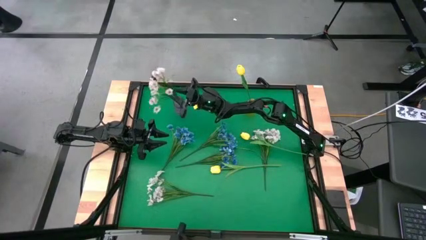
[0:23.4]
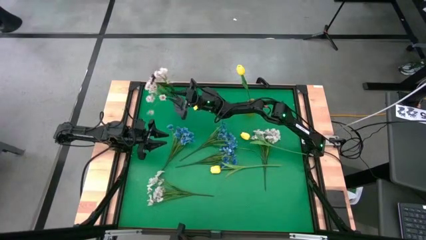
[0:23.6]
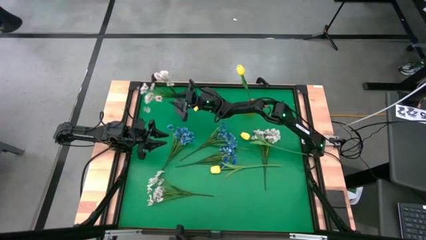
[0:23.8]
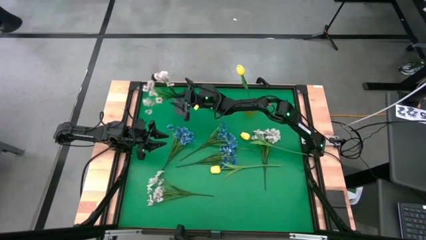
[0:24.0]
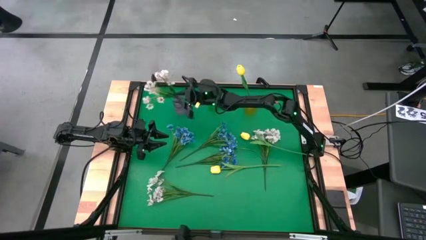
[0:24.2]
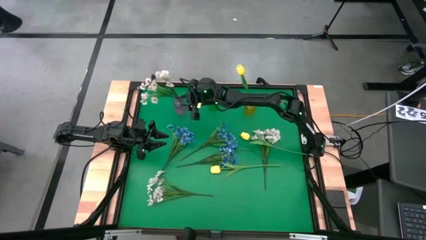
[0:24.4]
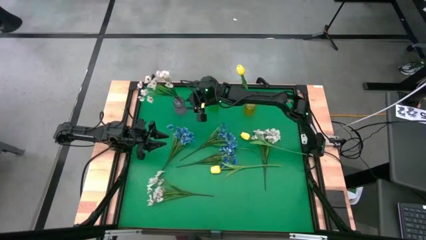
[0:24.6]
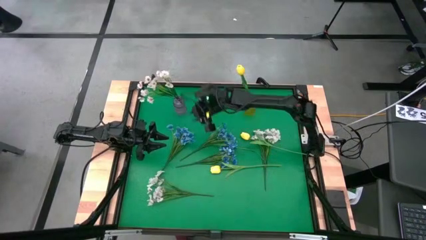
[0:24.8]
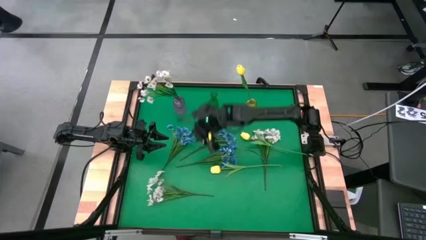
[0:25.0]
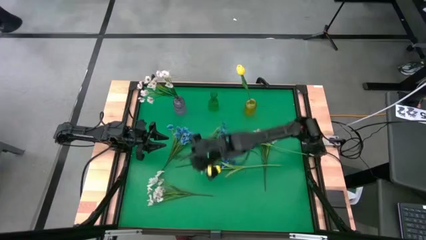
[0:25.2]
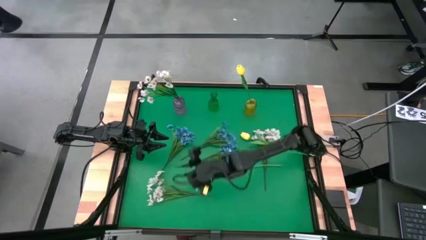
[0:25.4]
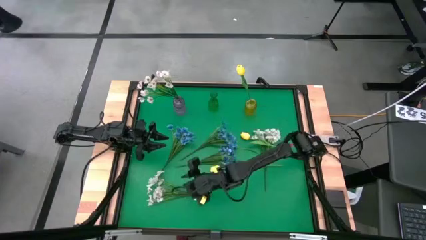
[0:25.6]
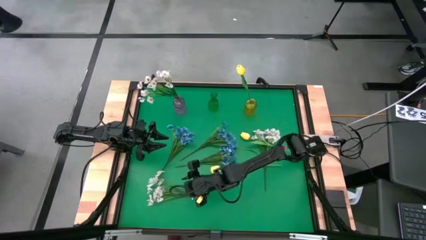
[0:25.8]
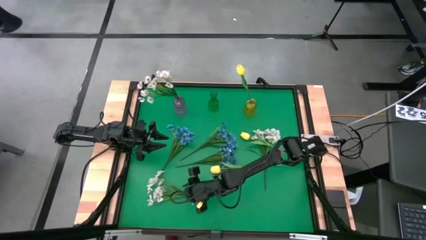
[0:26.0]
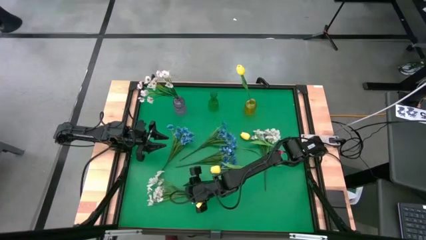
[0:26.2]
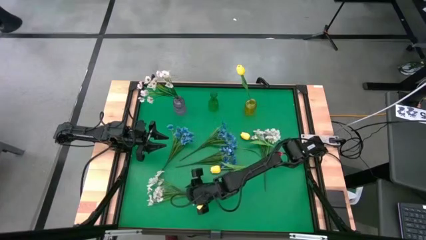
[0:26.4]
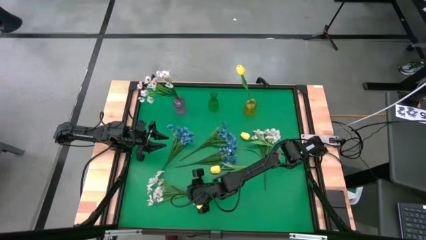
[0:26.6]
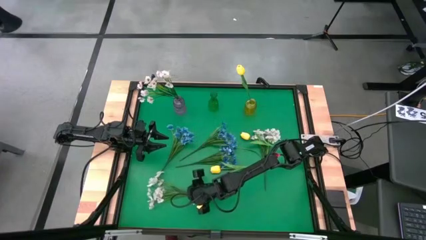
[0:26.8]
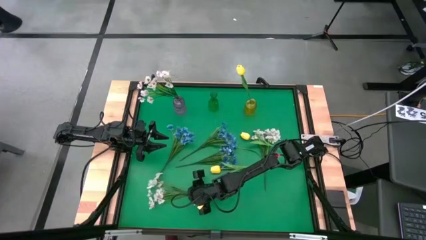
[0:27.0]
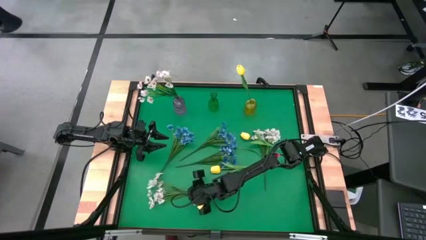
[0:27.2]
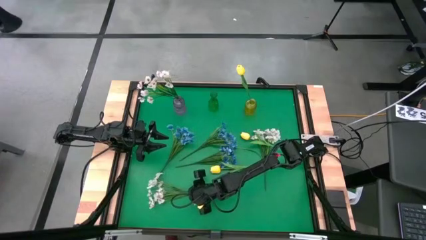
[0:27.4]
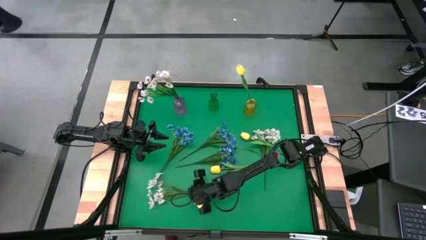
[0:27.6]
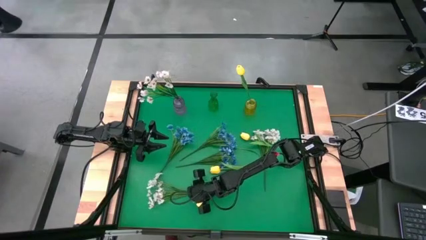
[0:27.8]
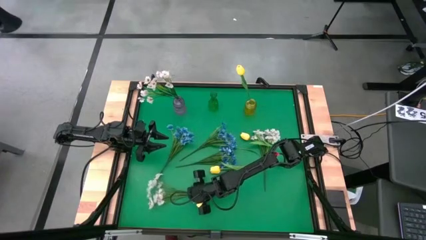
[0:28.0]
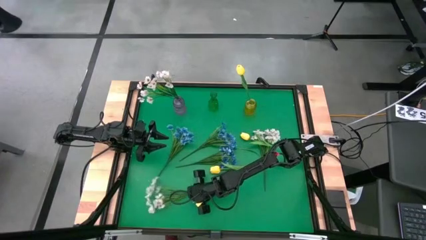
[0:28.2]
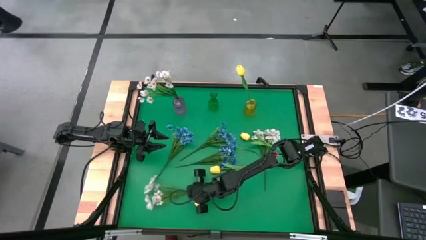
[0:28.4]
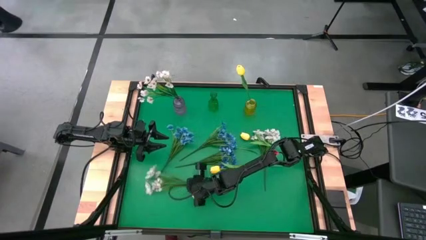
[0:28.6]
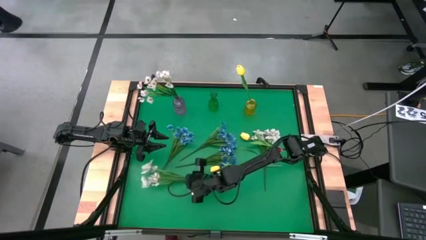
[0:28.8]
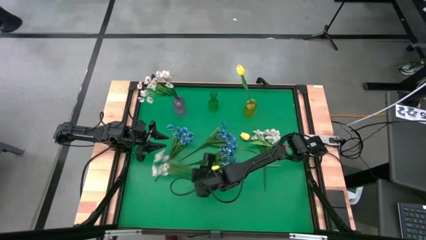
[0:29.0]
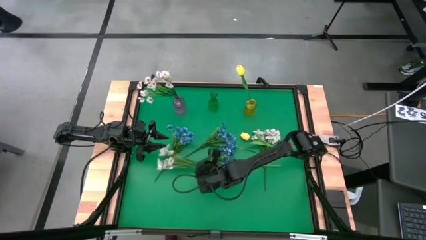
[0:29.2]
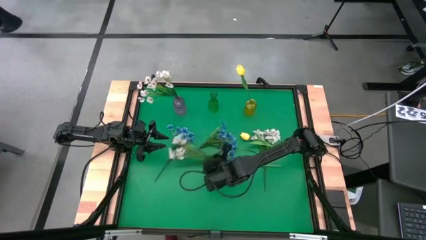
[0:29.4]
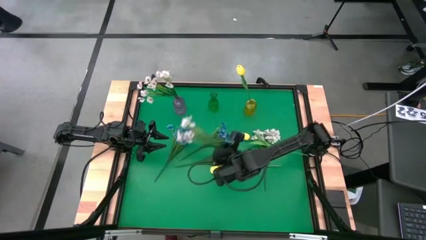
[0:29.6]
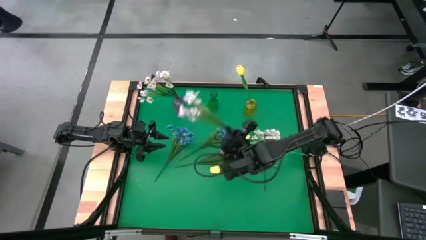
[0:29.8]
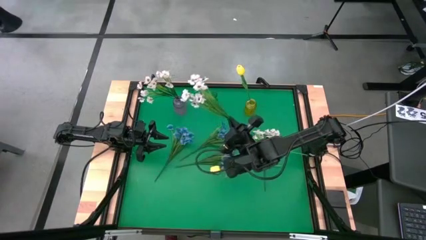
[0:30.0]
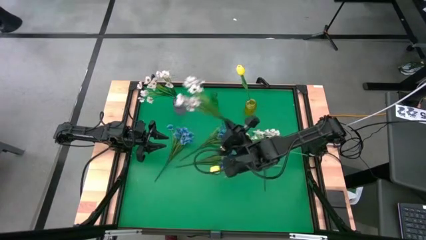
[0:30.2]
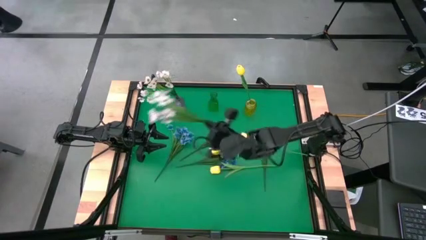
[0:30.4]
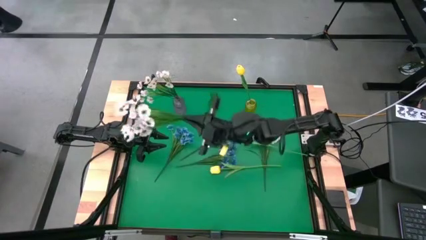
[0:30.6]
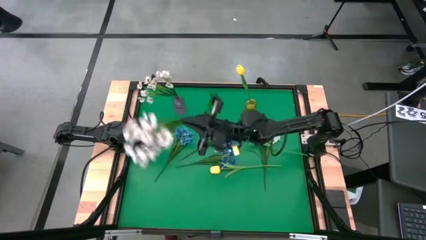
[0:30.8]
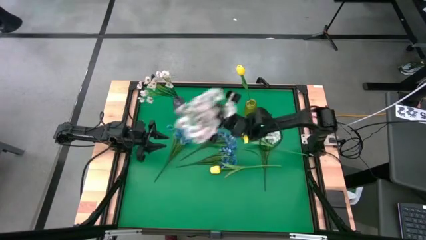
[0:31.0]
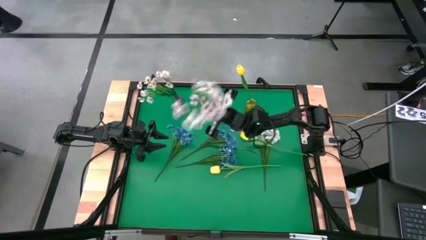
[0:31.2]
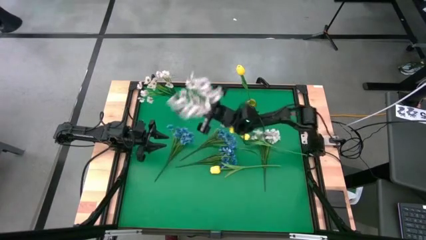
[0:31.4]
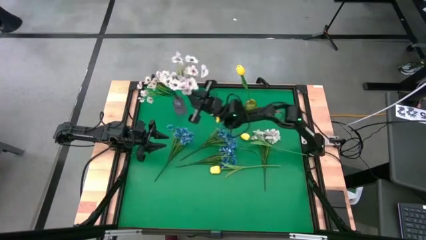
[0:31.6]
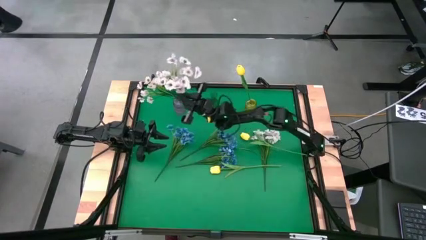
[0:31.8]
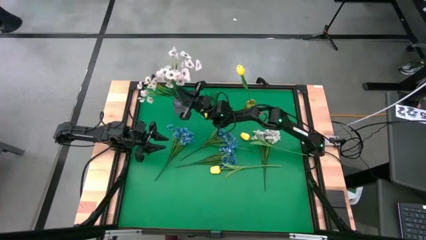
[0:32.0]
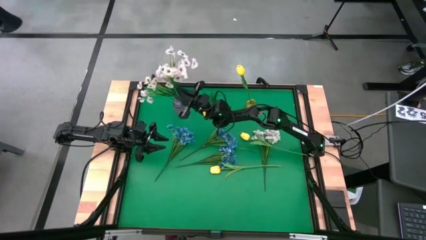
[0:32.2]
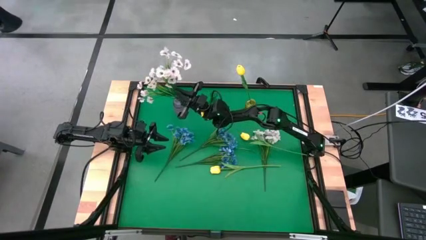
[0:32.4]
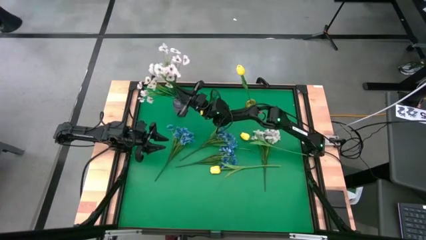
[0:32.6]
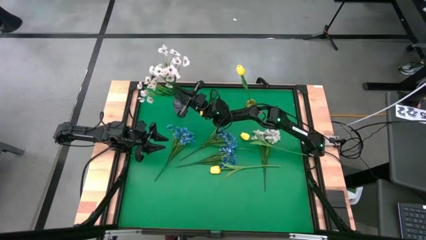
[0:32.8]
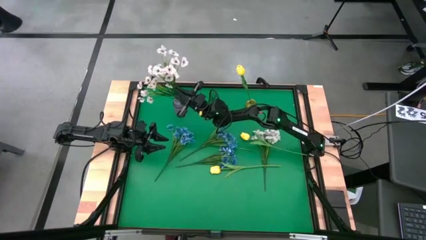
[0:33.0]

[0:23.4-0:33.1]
Task: Sort flowers into vase by color
Put the left white flower into the violet vase

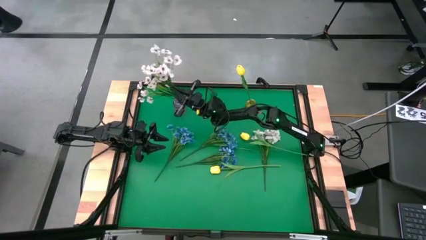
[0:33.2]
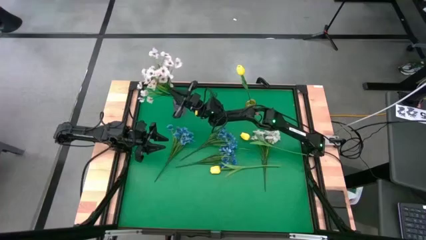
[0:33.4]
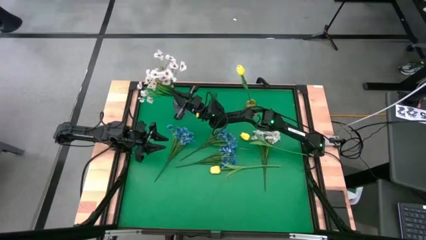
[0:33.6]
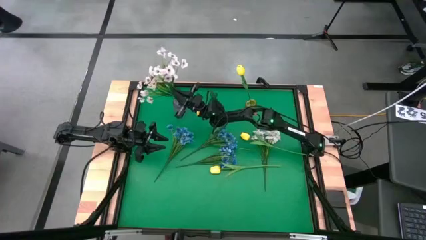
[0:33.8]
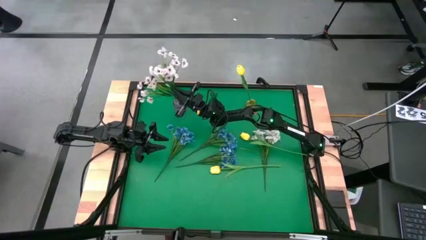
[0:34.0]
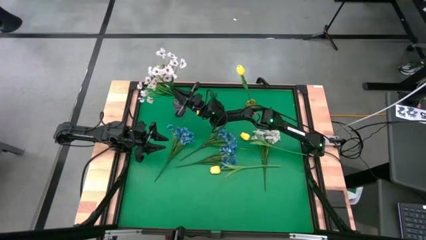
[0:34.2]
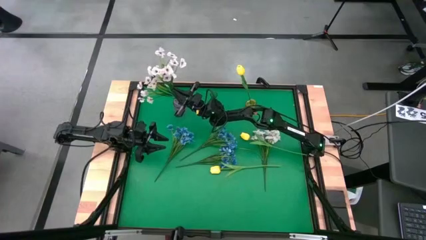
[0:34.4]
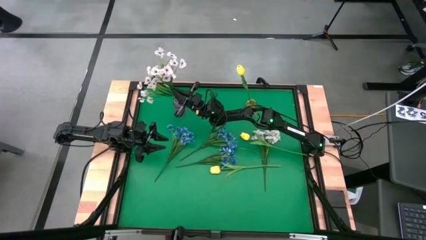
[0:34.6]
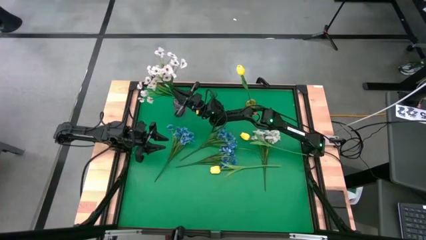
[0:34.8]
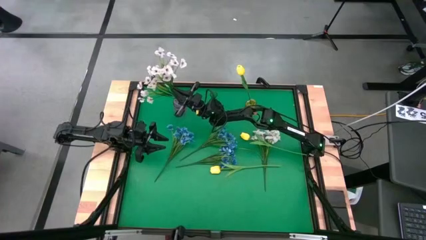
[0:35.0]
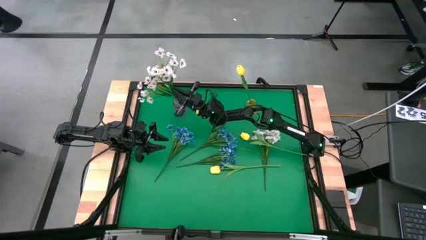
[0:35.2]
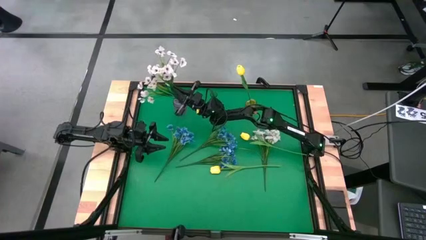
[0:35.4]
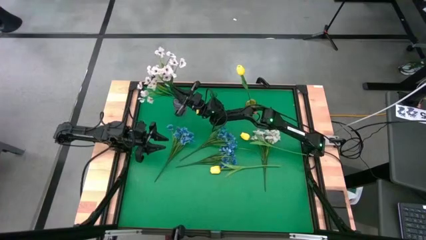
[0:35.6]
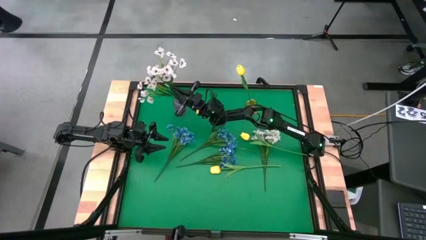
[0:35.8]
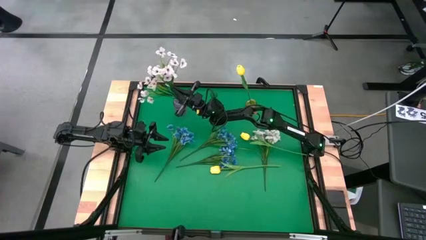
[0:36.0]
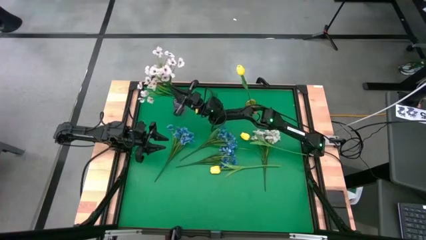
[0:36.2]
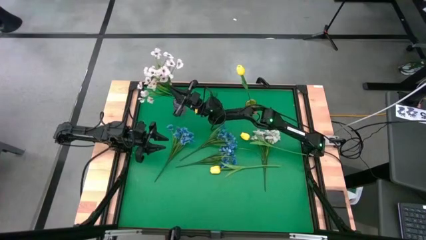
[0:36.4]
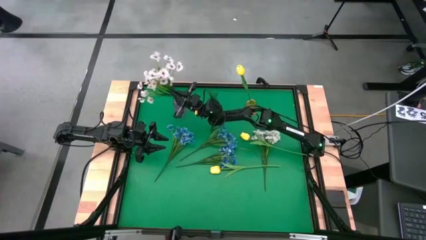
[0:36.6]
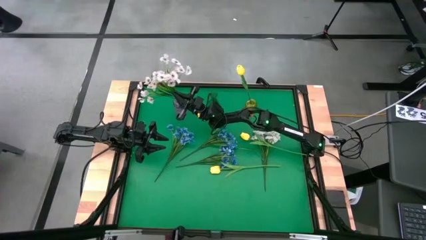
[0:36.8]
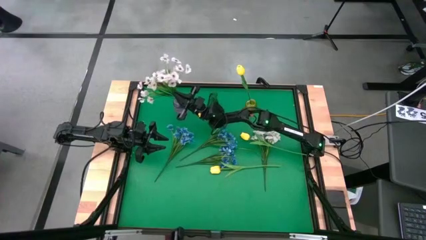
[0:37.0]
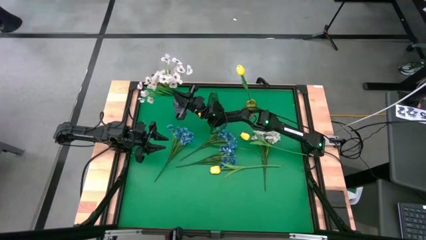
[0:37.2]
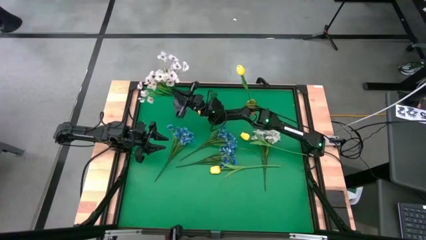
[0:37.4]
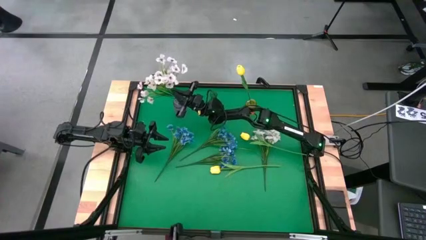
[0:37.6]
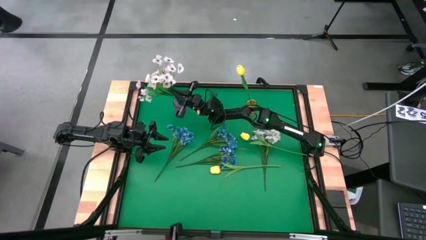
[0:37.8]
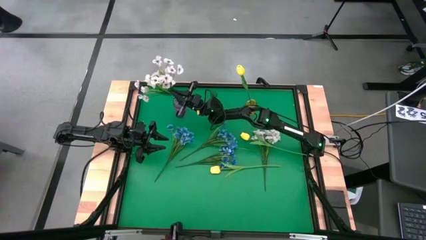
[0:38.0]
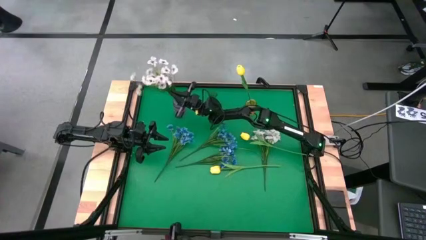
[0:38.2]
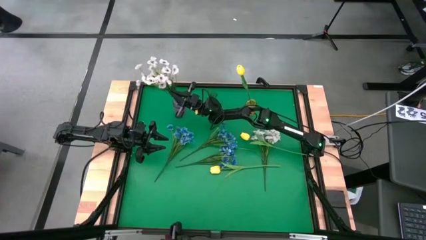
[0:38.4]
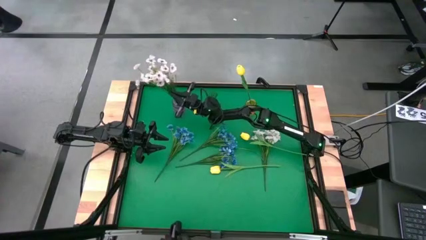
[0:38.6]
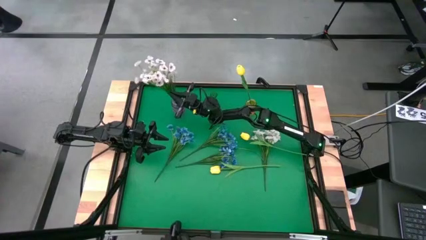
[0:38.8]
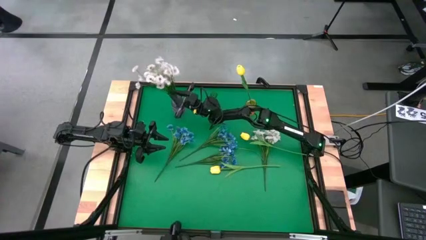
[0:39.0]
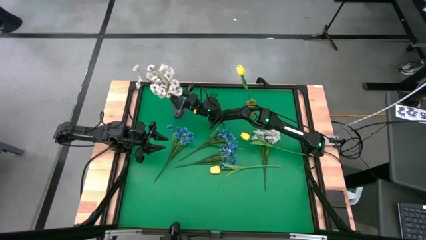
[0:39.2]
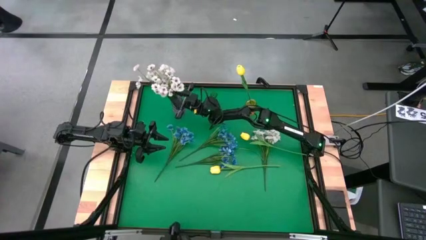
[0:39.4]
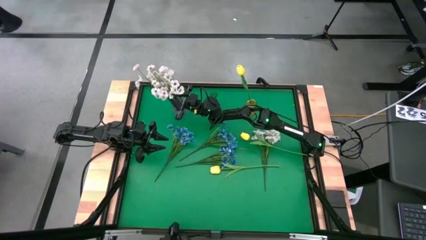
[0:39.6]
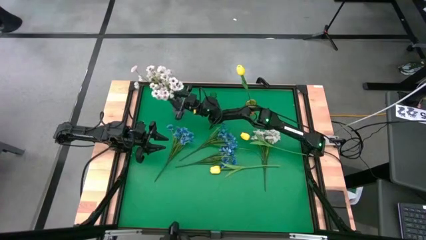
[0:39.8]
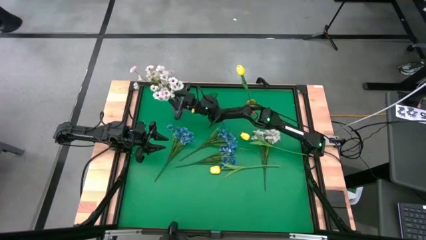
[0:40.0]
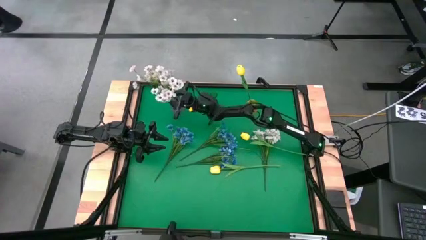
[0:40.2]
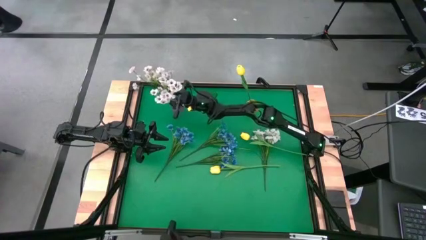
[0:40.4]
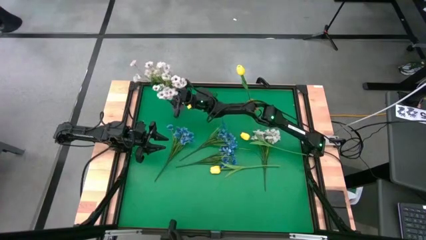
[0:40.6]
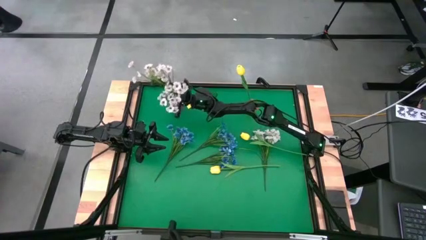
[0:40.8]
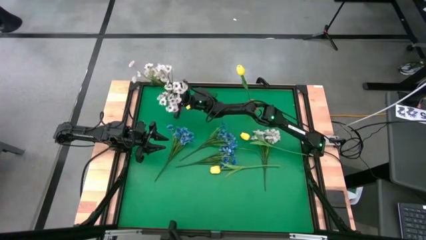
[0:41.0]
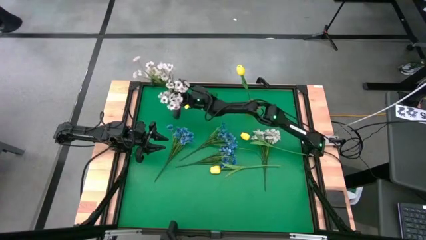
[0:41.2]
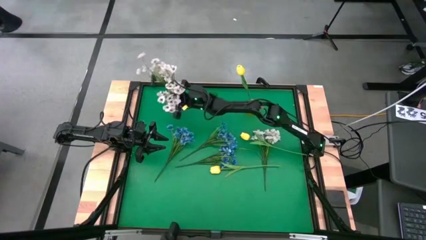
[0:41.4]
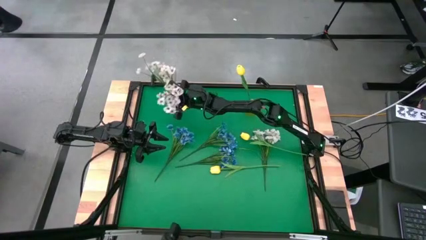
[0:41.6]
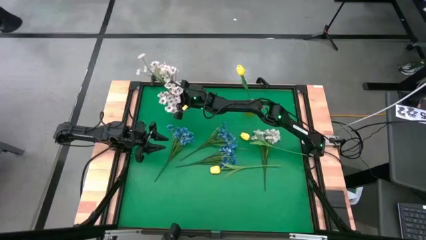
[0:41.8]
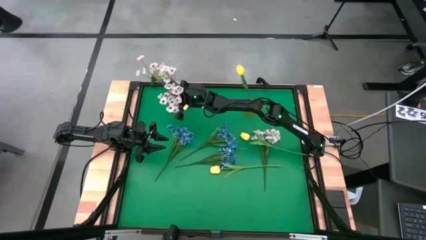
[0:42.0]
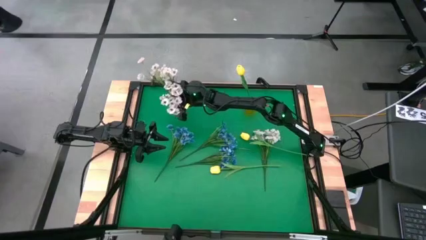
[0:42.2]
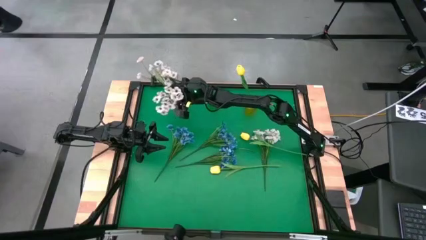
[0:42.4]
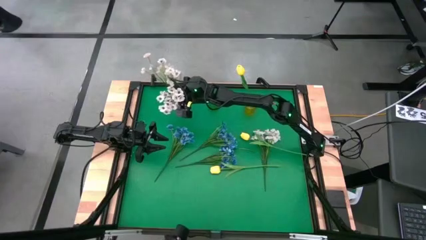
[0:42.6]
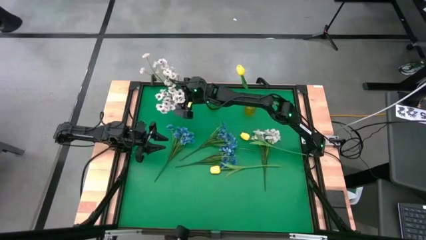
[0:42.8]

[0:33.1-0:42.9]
Put the left white flower into the violet vase
